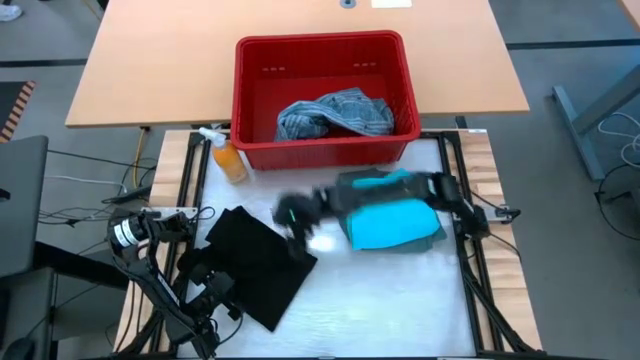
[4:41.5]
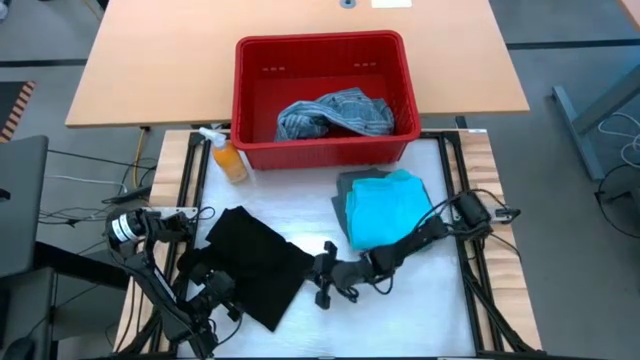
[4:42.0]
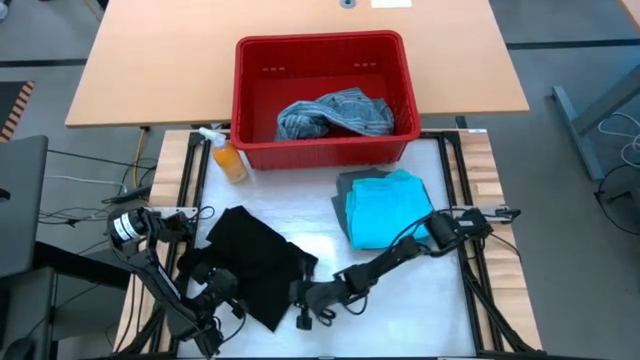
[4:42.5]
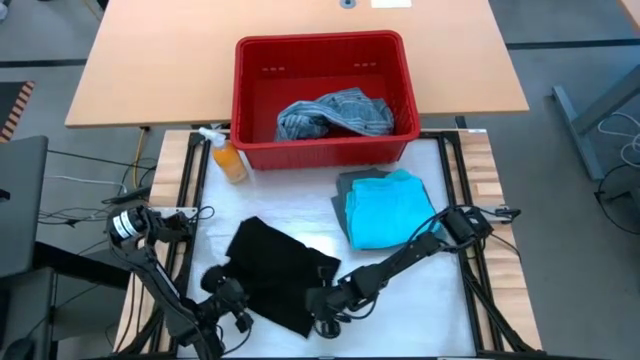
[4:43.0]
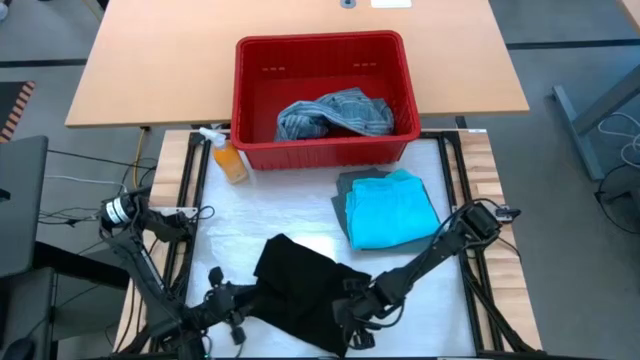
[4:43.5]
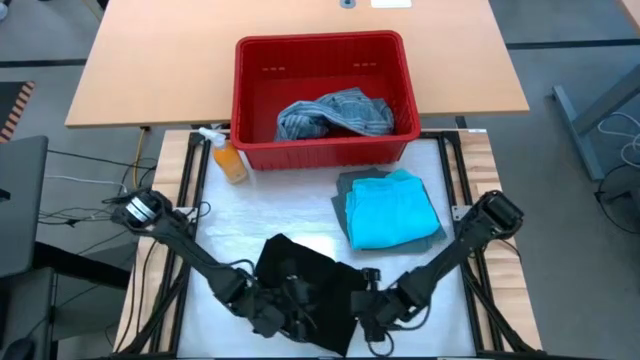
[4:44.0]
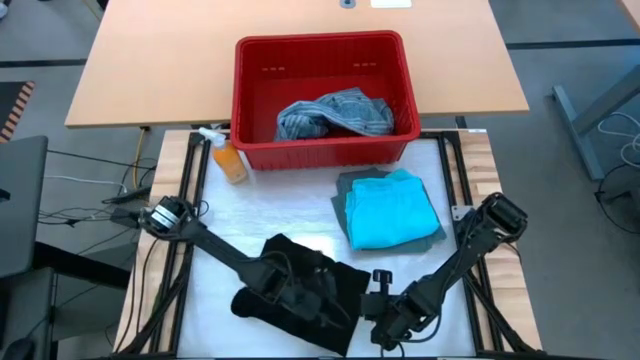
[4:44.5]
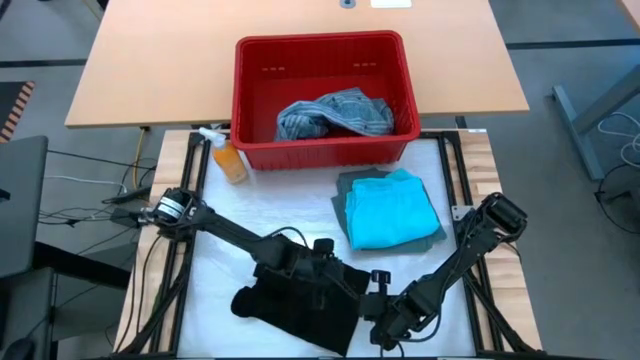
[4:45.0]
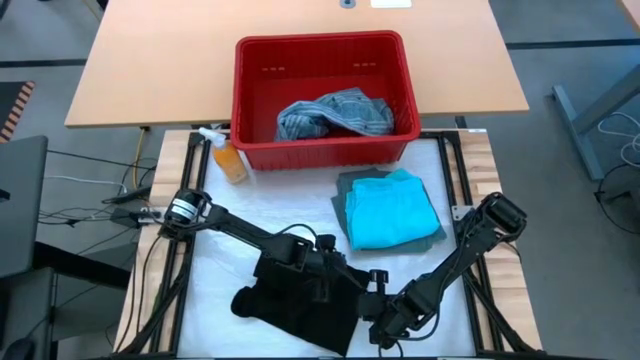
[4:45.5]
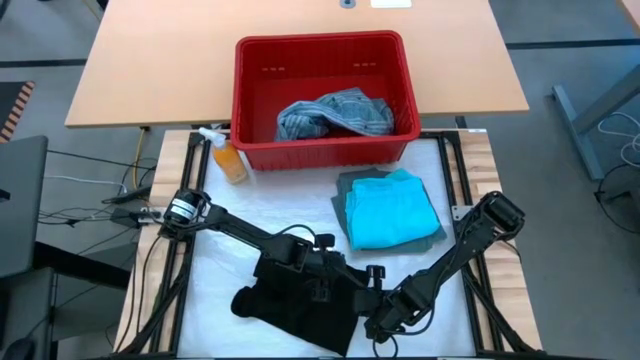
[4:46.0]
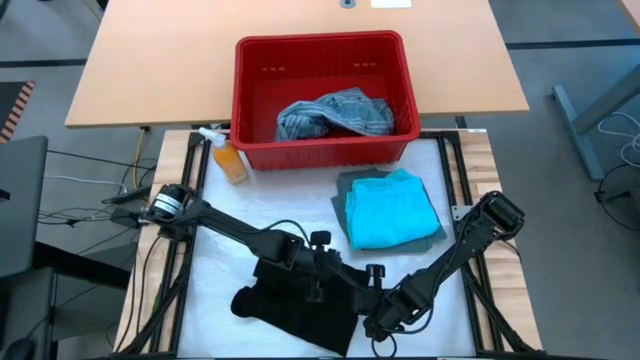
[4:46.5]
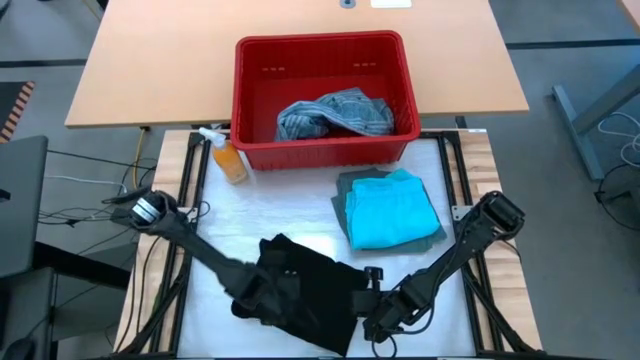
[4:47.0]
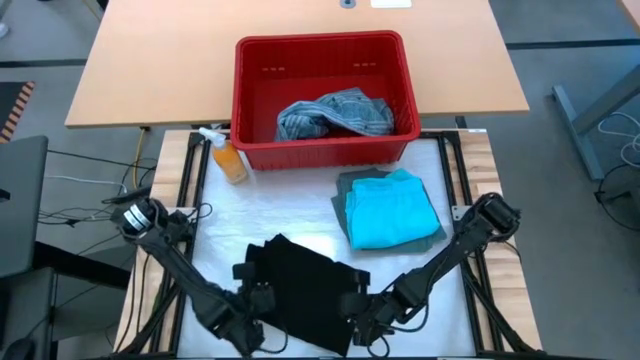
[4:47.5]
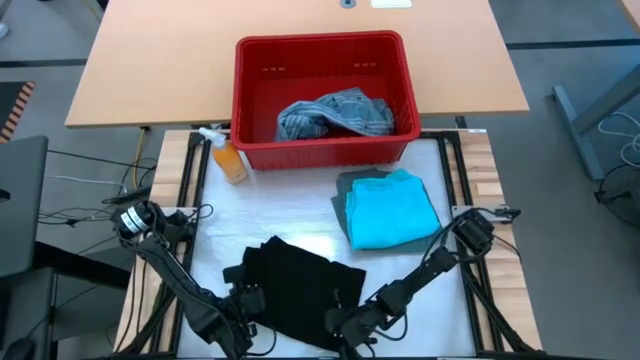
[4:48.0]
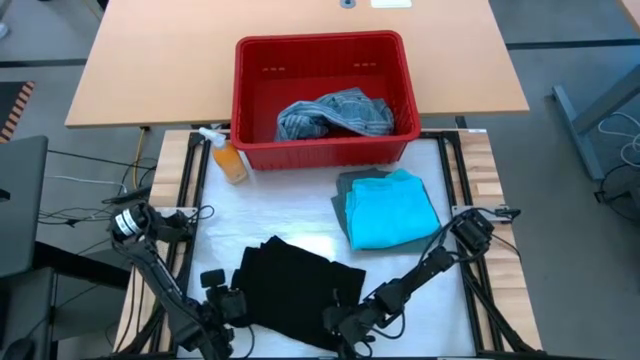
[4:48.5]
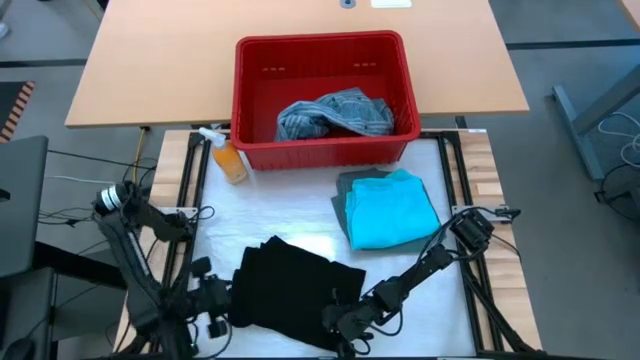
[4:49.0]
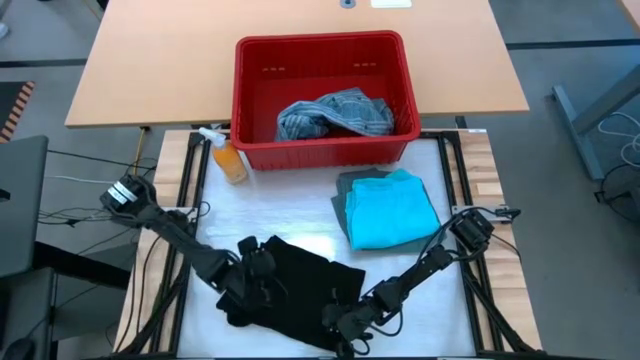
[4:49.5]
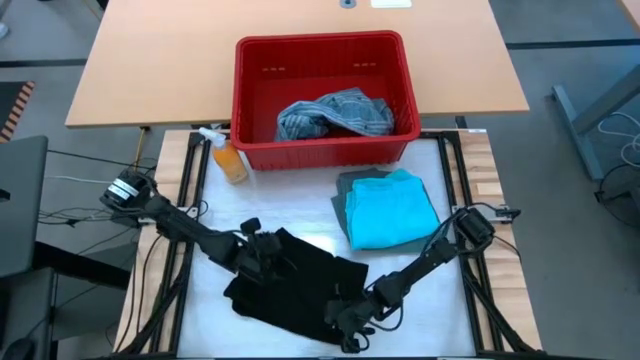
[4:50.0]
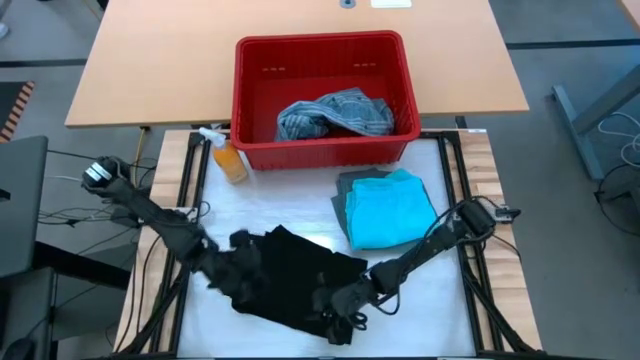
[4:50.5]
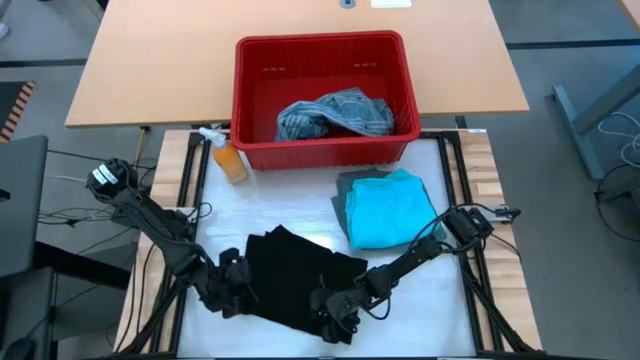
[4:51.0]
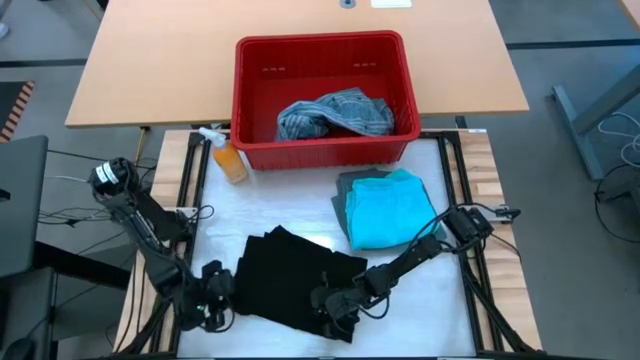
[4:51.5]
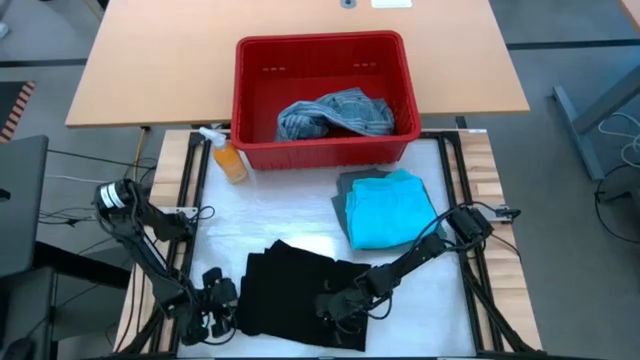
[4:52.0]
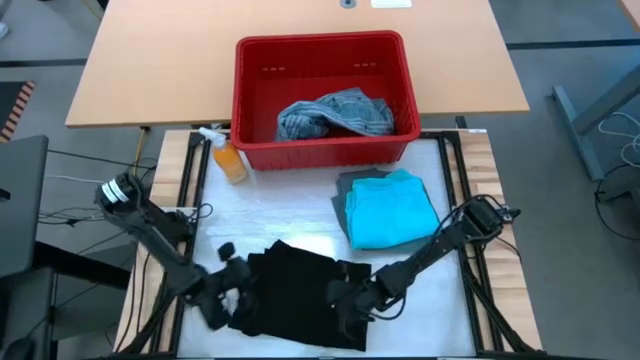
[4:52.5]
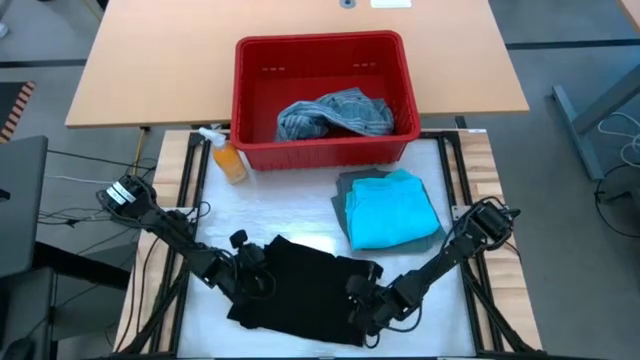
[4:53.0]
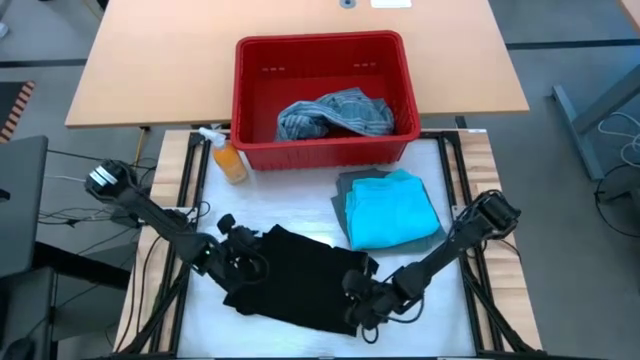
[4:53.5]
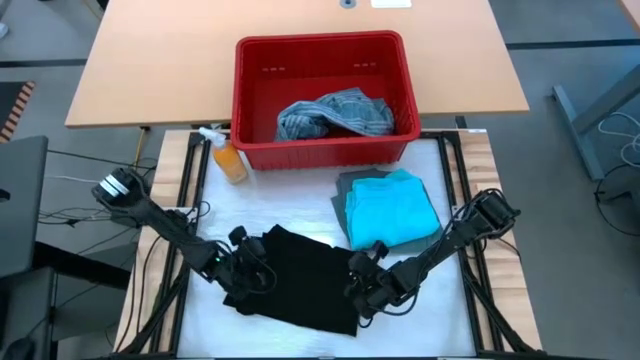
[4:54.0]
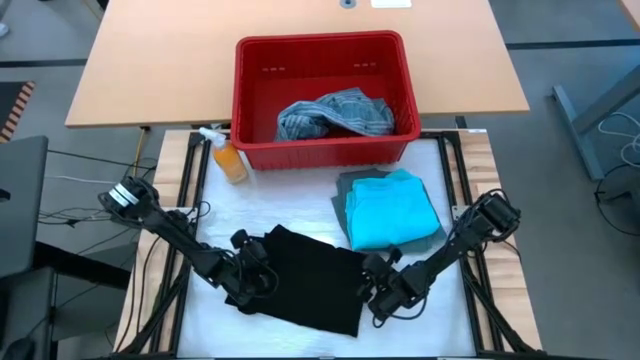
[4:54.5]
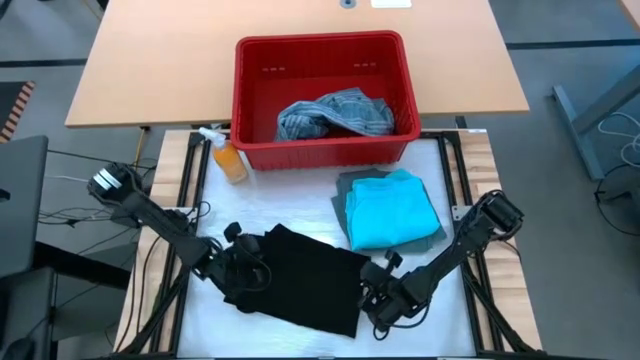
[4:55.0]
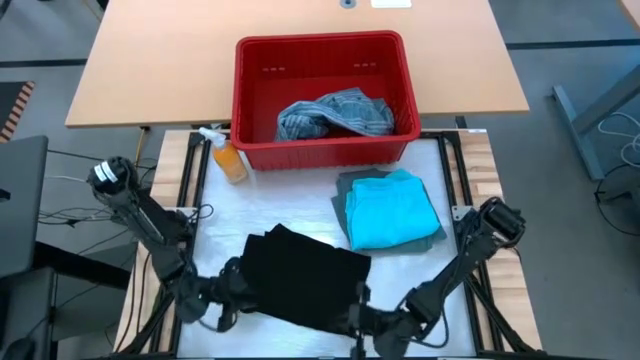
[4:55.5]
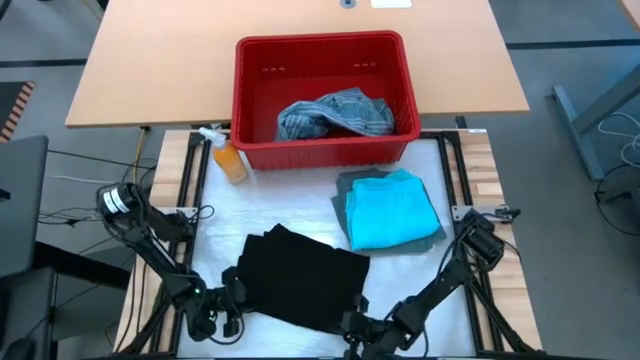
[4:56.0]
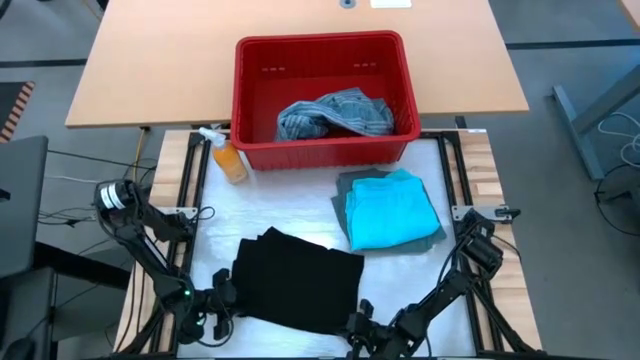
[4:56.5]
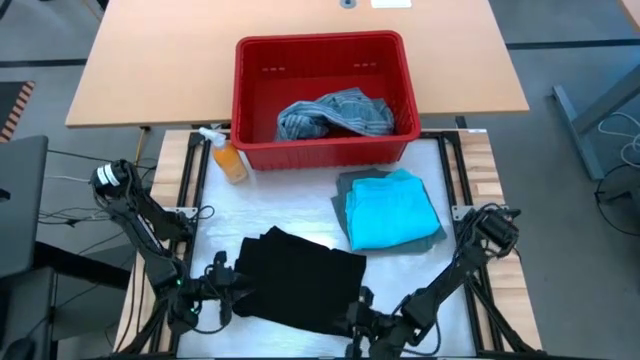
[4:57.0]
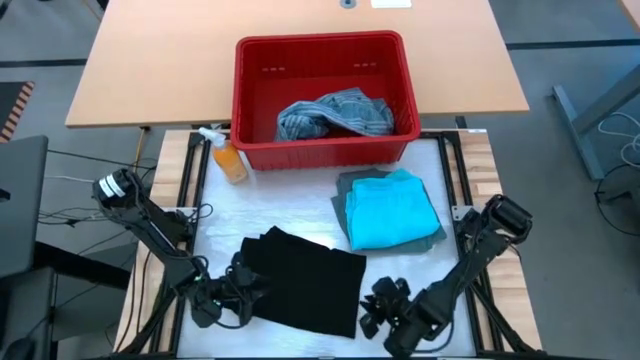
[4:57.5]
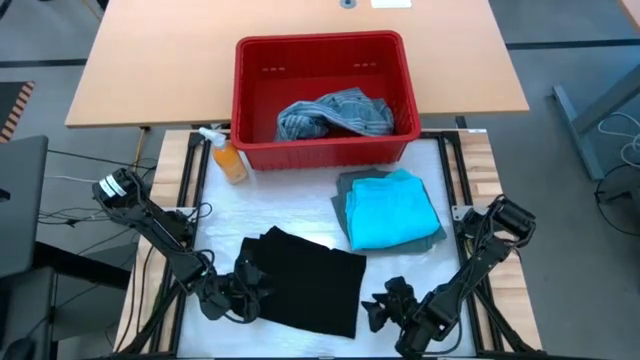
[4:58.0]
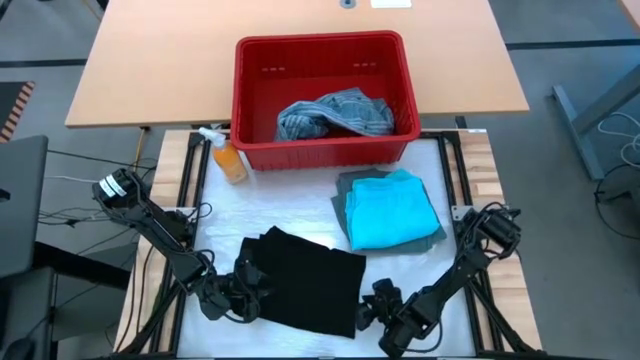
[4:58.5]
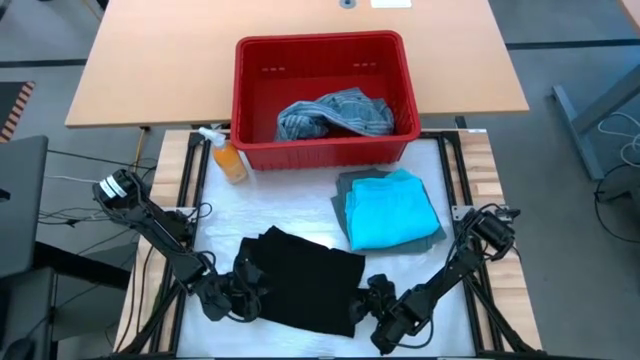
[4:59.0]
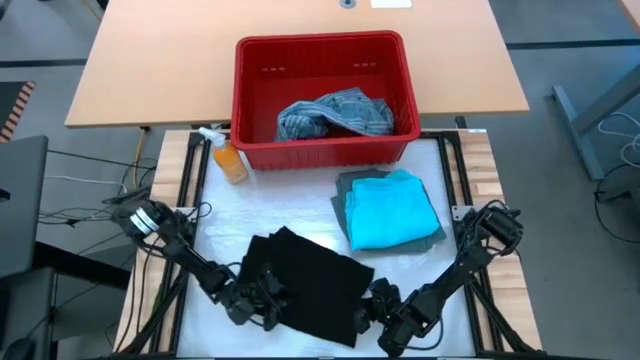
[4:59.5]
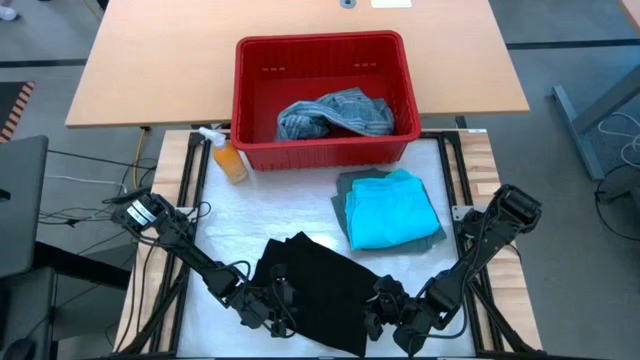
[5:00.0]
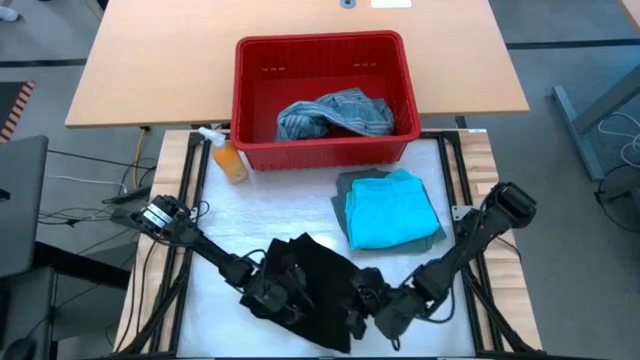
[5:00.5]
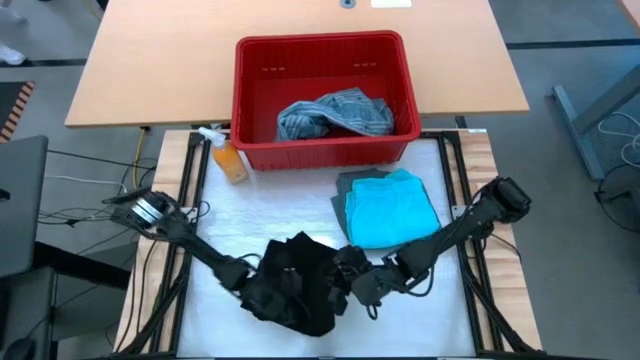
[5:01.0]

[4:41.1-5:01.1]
Task: Fold Laundry from Bin
Fold the black shirt

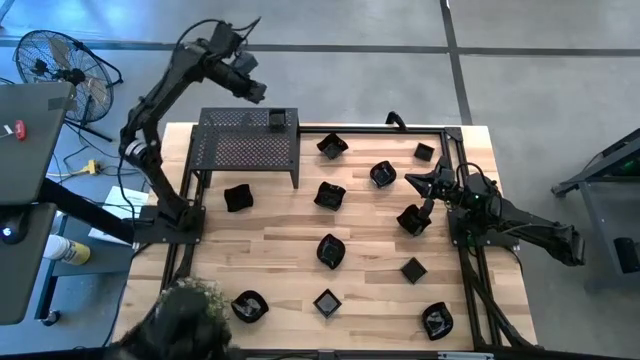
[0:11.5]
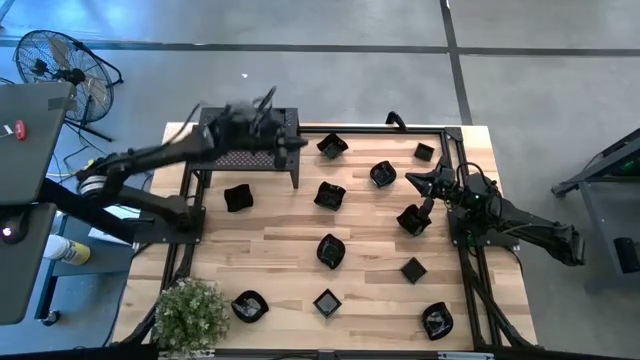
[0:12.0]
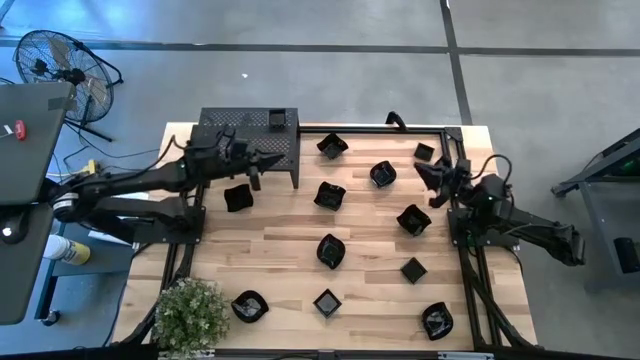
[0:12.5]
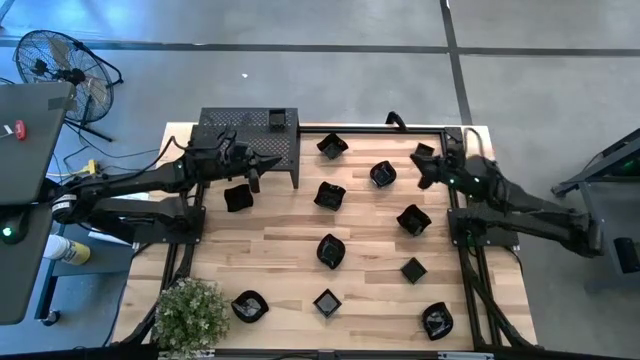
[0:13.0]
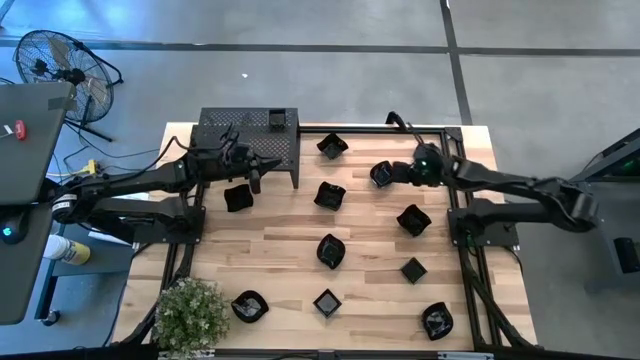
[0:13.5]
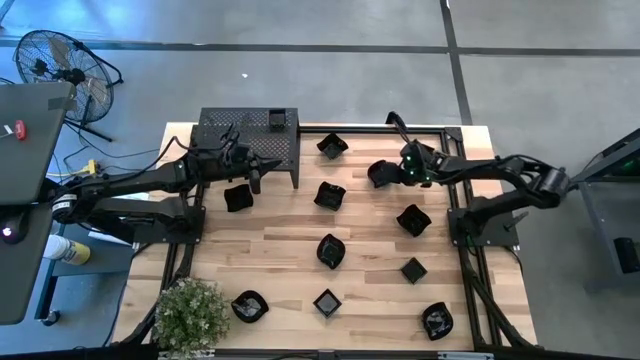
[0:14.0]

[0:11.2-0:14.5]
Task: Pick & Place Mini shaped plates
Put the leaf-shaped plate on the shelf
